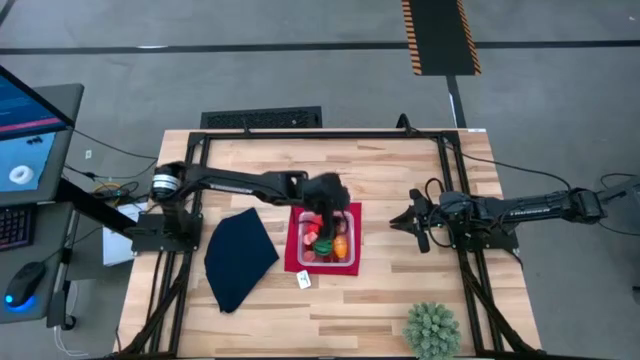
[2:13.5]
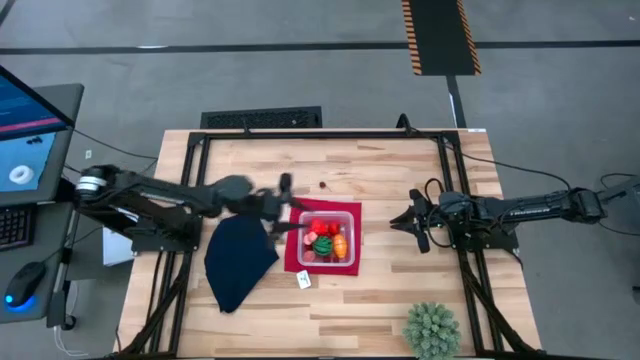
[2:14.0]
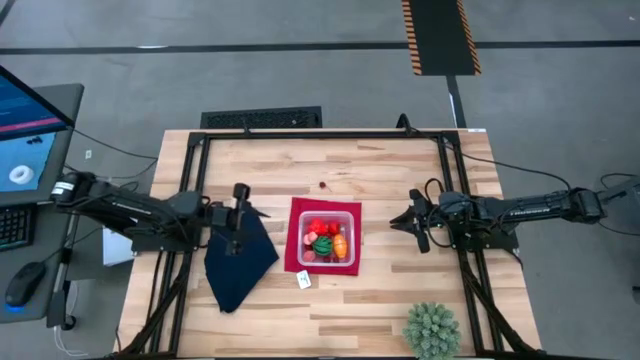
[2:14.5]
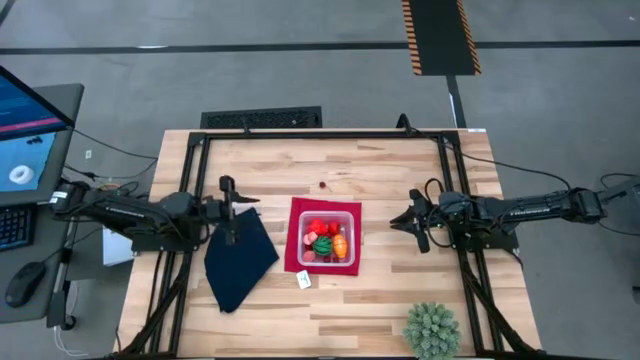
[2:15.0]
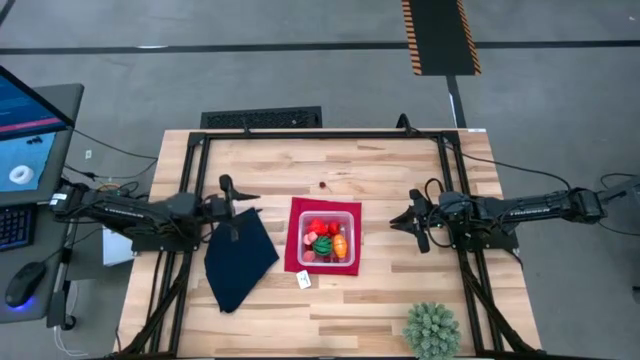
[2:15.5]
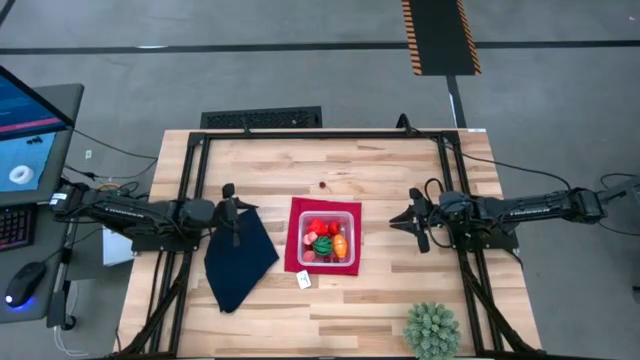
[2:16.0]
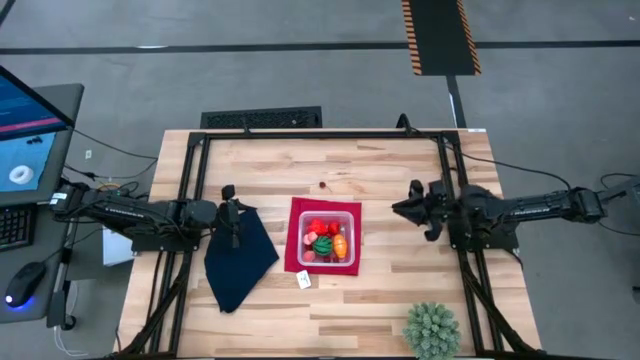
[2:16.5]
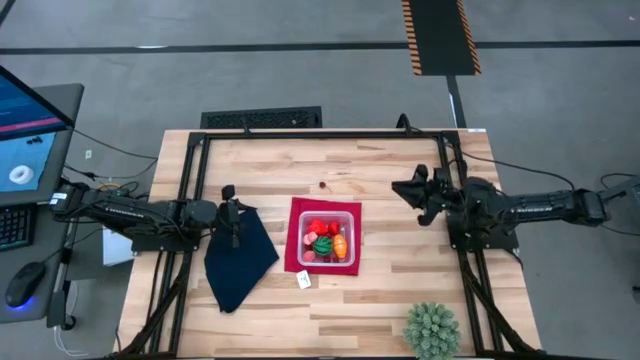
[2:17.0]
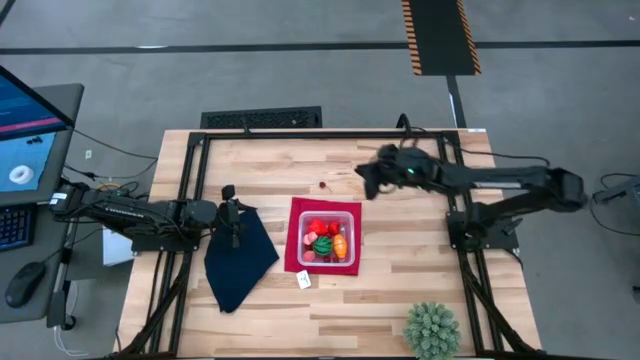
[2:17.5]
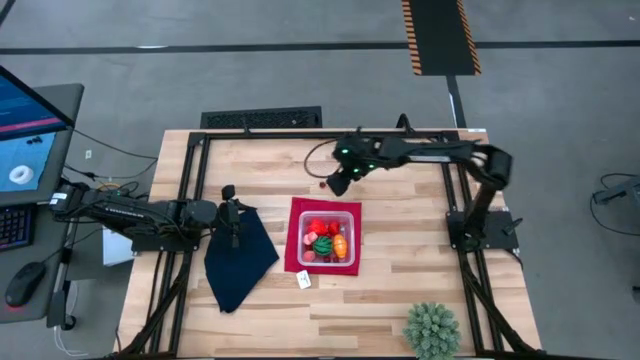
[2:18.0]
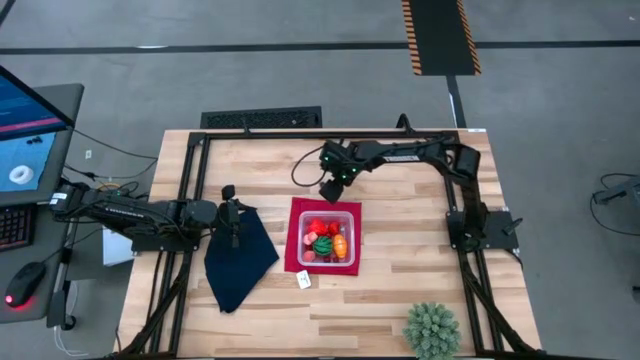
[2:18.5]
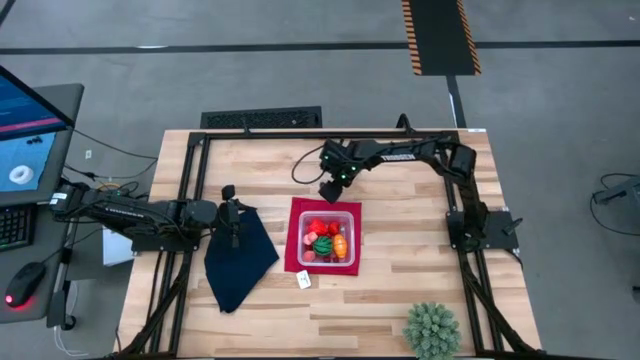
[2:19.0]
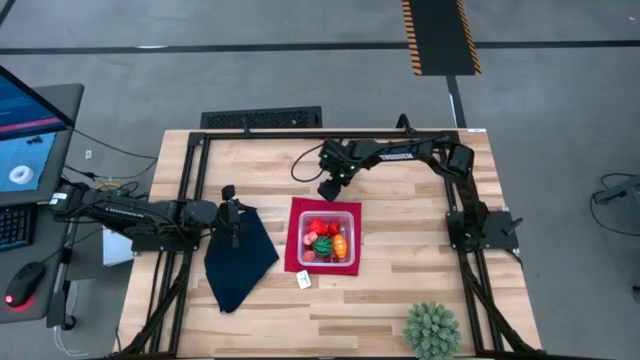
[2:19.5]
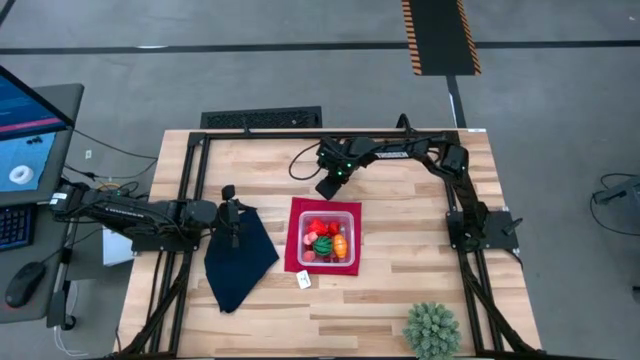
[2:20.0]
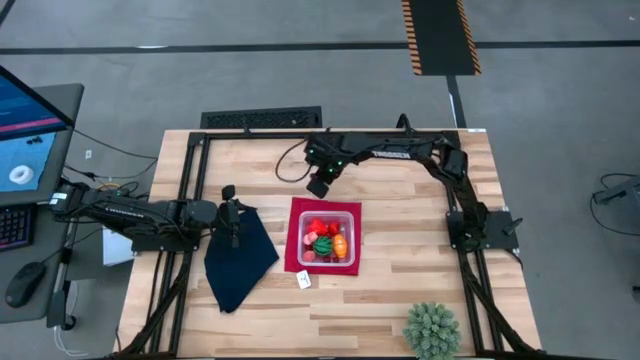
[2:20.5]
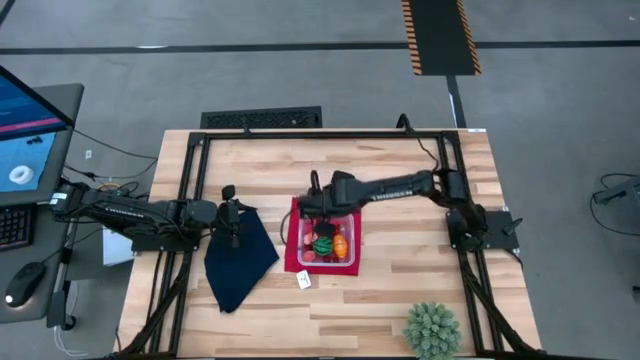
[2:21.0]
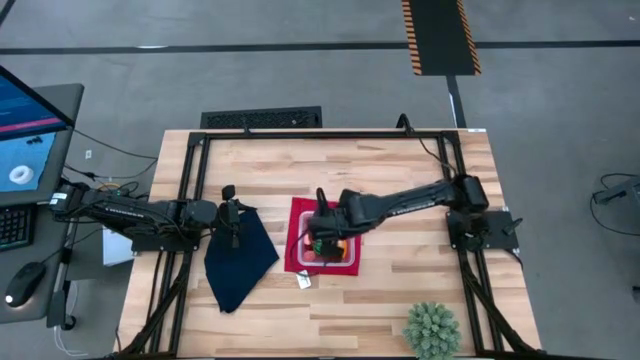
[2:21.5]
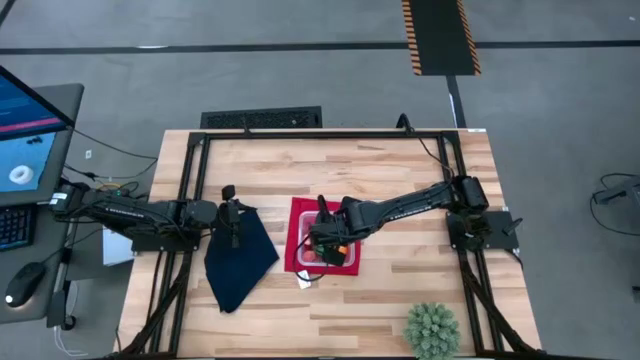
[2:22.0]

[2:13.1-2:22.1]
Task: Pick and placing Produce into tupperware
Put the cherry in the transparent bin

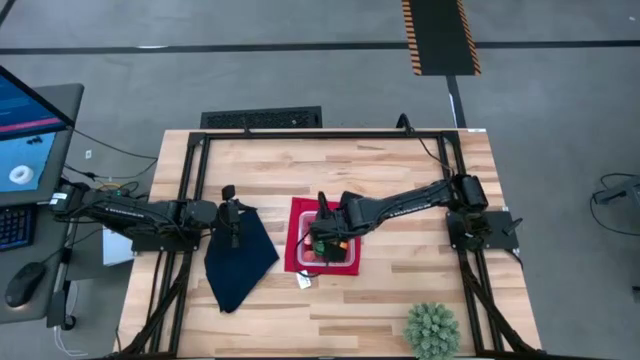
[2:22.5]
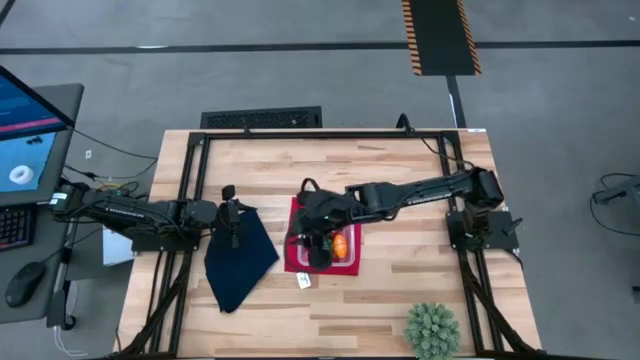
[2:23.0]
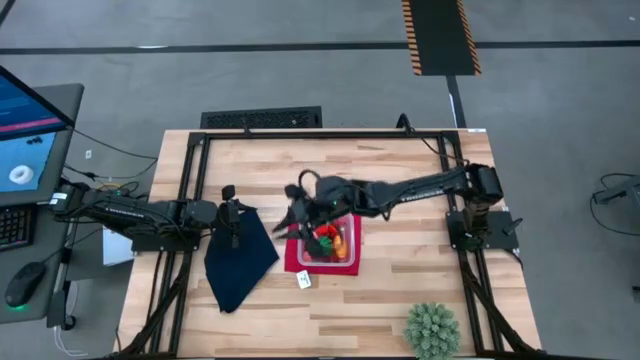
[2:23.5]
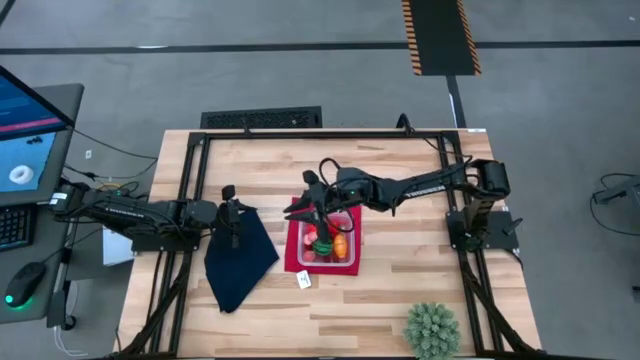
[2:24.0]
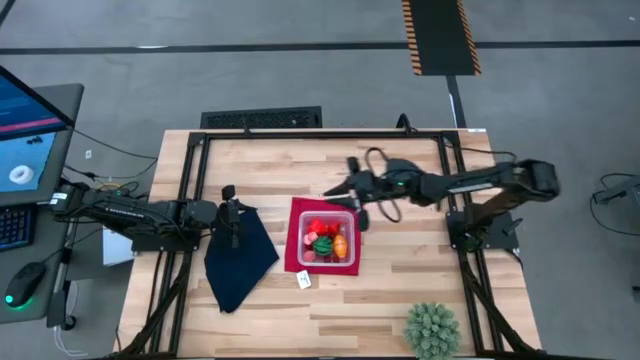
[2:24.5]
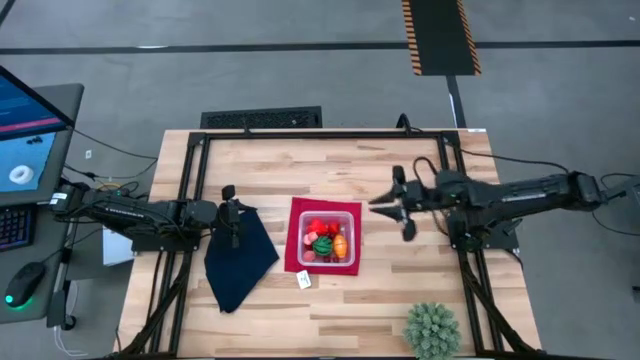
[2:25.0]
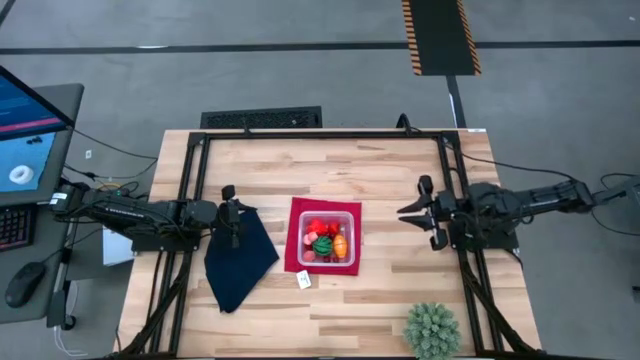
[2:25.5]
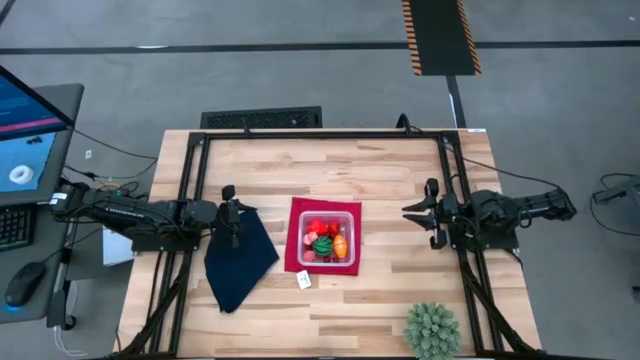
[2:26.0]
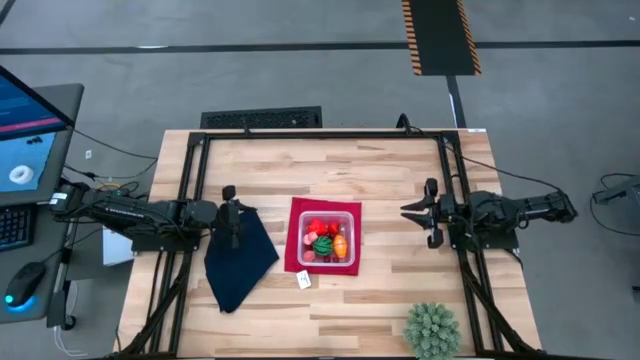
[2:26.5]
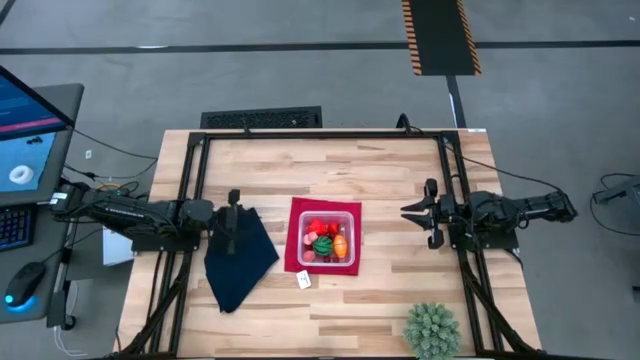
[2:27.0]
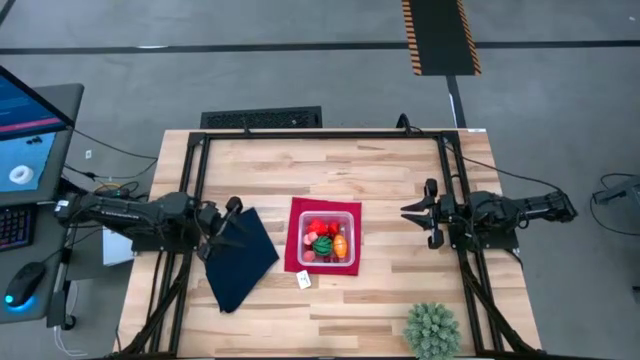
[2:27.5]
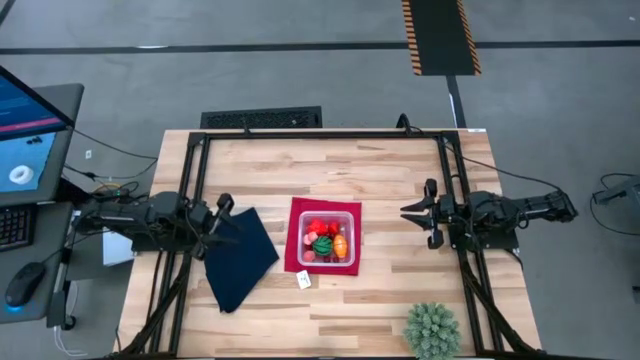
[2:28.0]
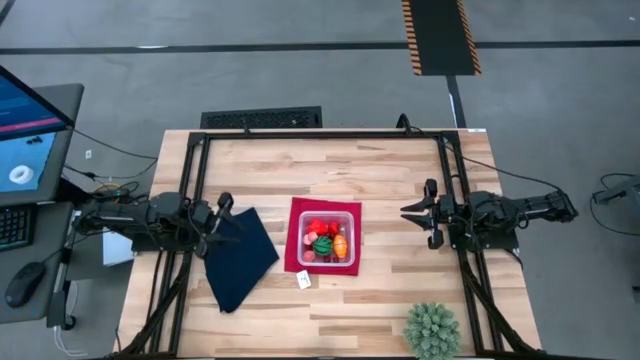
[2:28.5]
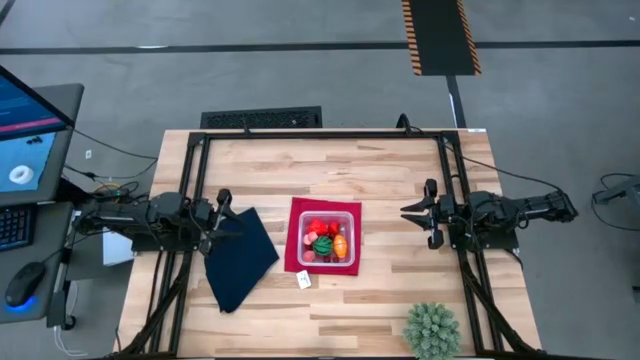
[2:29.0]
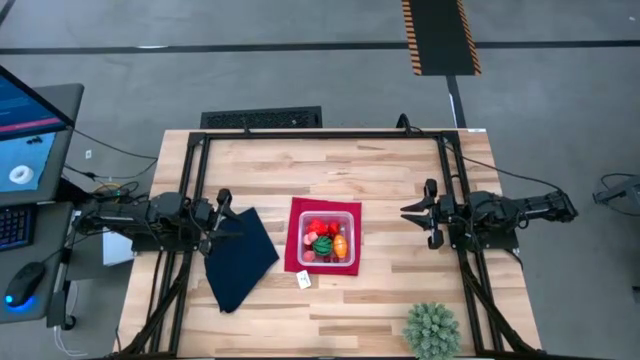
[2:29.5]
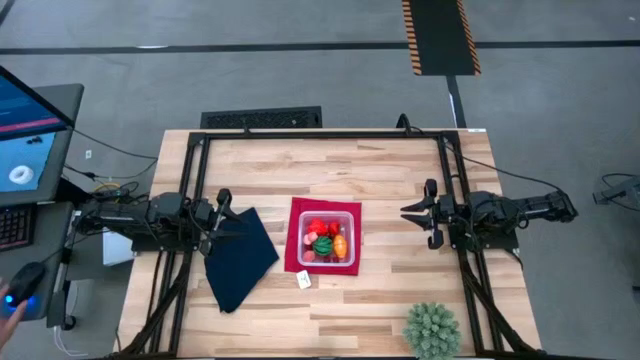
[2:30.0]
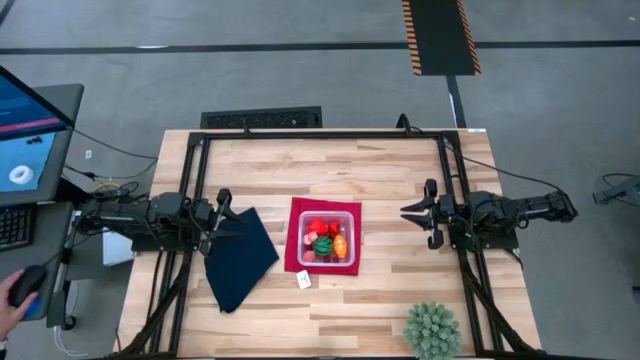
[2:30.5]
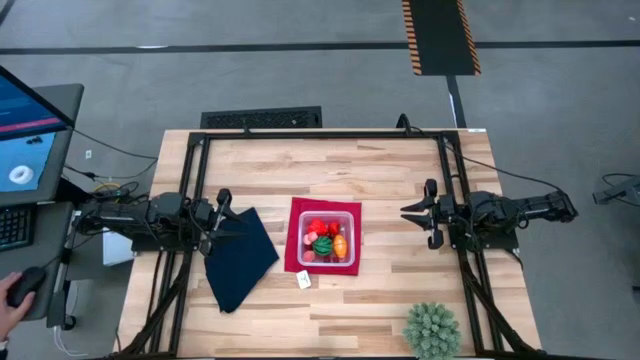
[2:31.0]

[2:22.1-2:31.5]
Return to Home Position

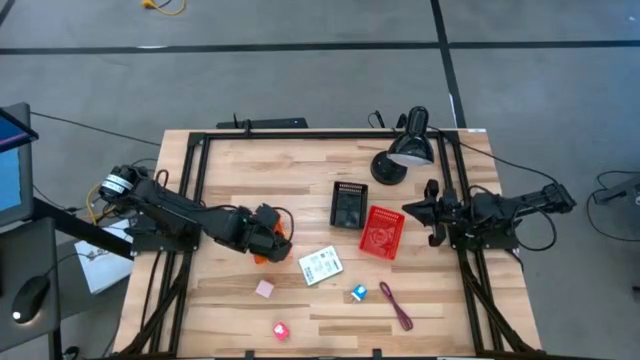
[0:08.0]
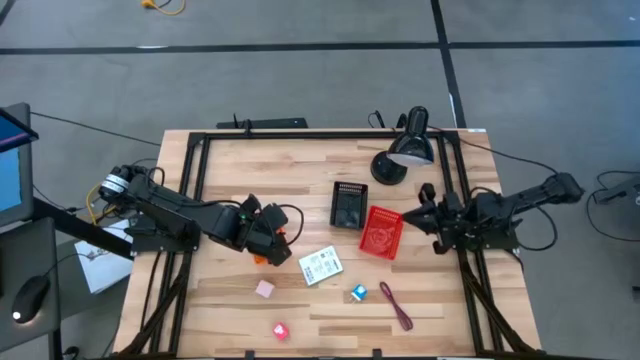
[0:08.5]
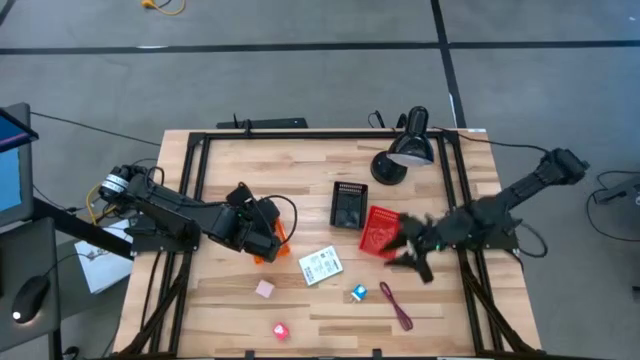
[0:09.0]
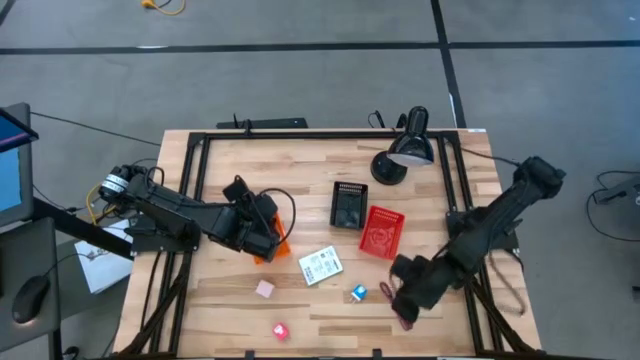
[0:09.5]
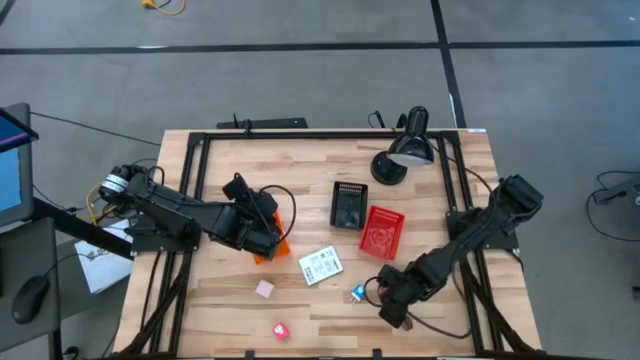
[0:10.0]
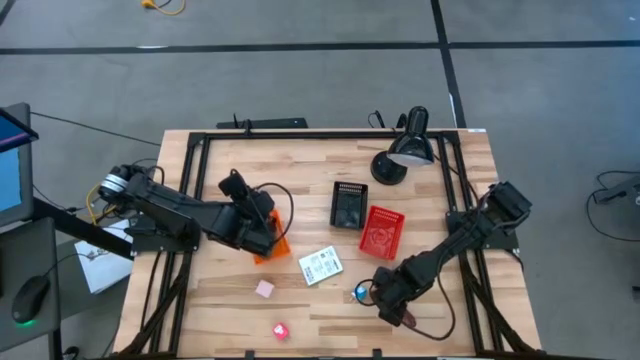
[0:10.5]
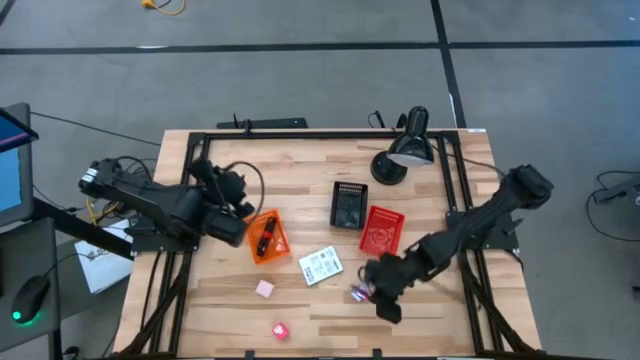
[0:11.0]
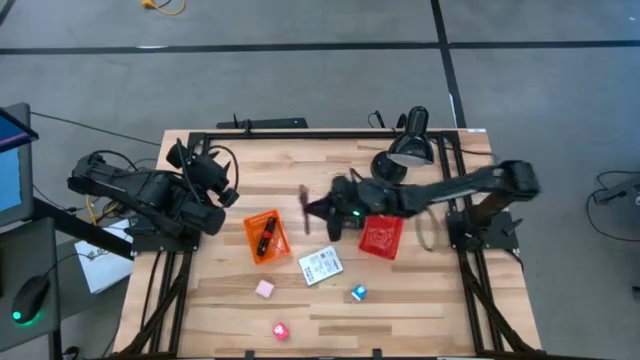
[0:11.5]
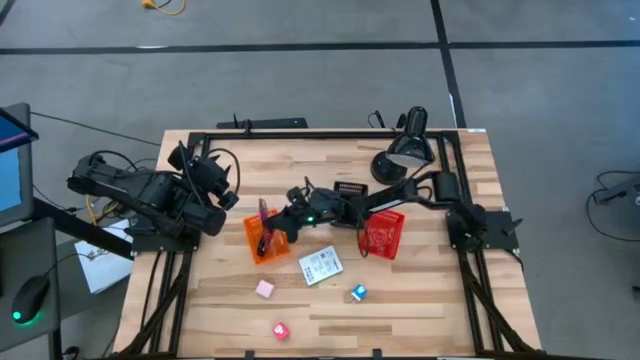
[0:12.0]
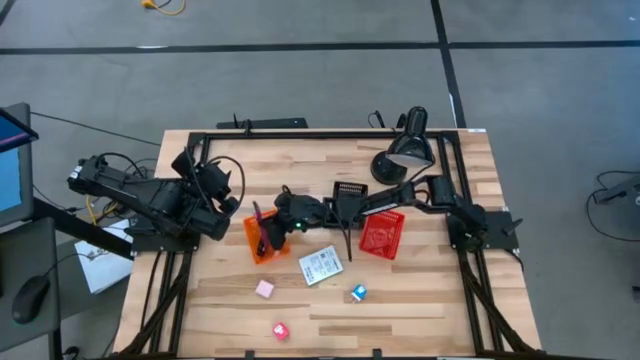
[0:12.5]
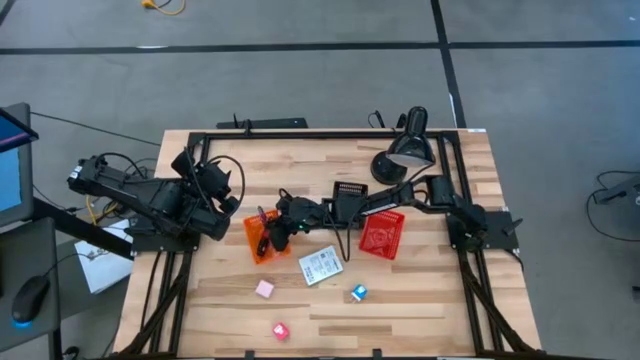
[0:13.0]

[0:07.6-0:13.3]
Task: Pick and place items into bin
Put the pink charger cable into the orange bin
